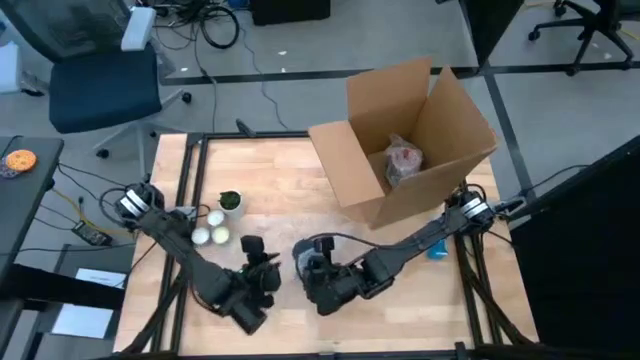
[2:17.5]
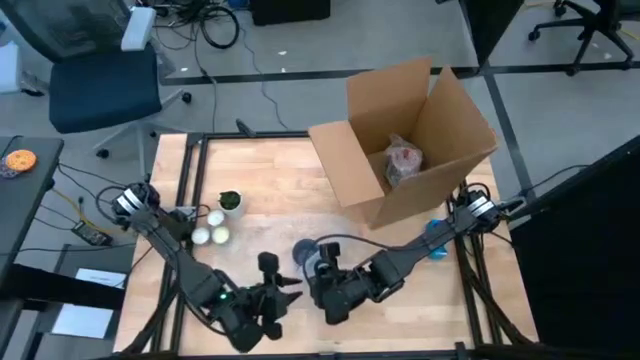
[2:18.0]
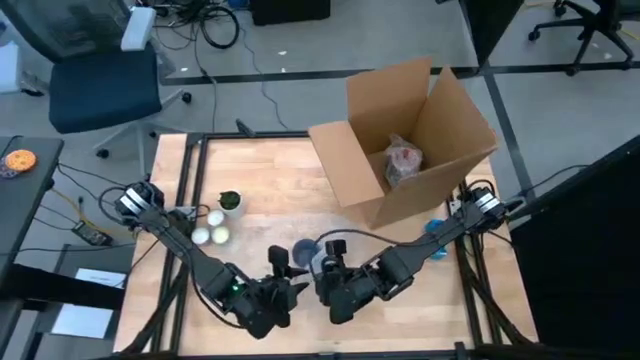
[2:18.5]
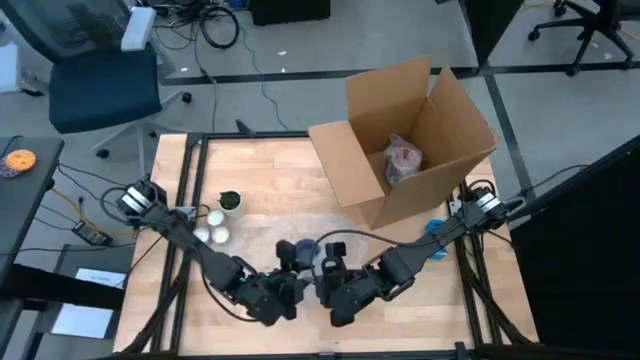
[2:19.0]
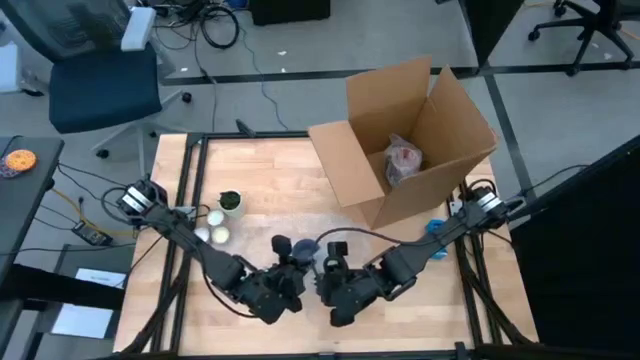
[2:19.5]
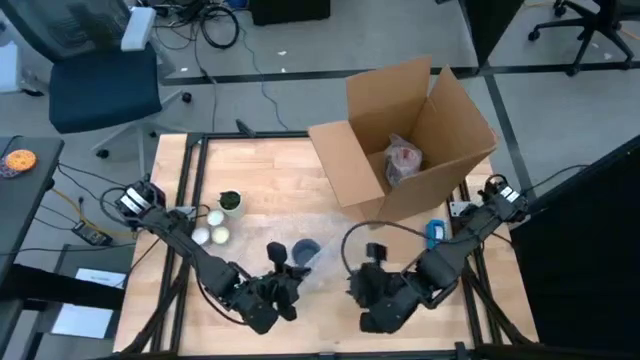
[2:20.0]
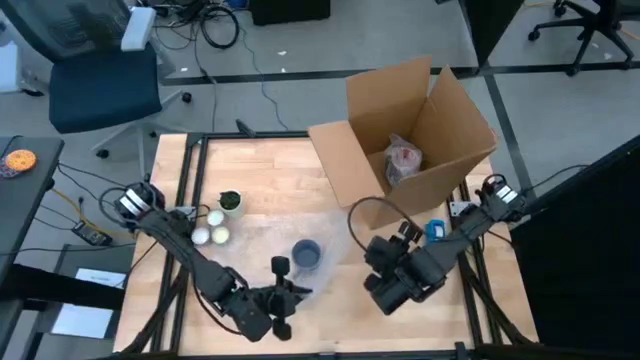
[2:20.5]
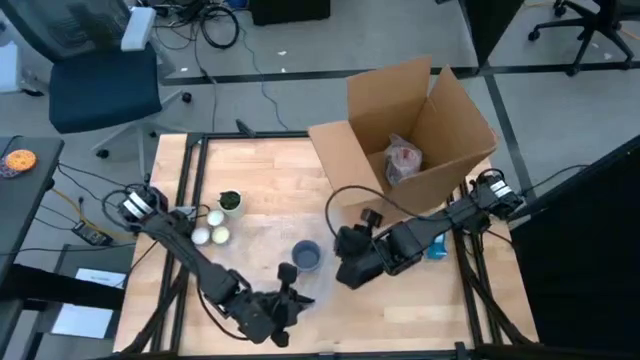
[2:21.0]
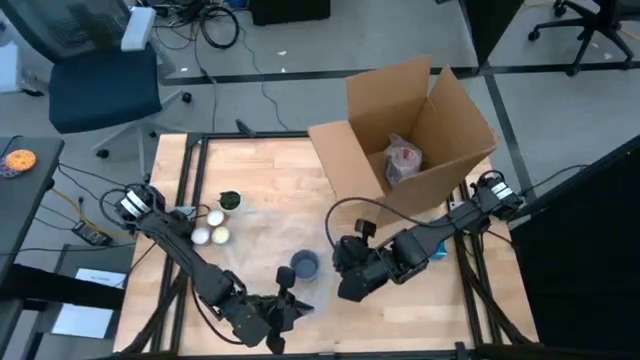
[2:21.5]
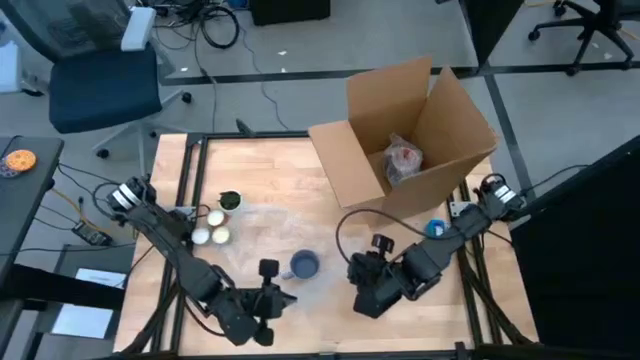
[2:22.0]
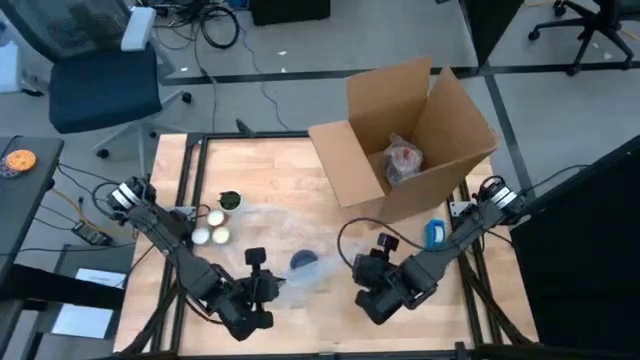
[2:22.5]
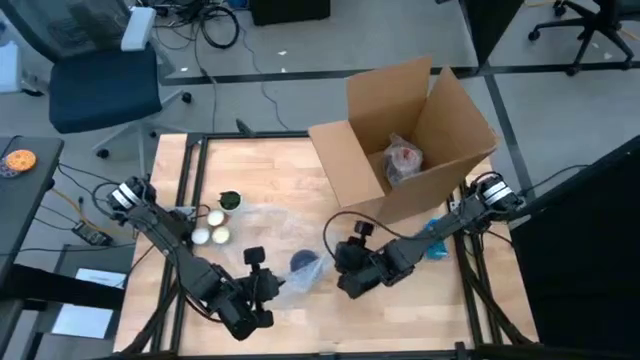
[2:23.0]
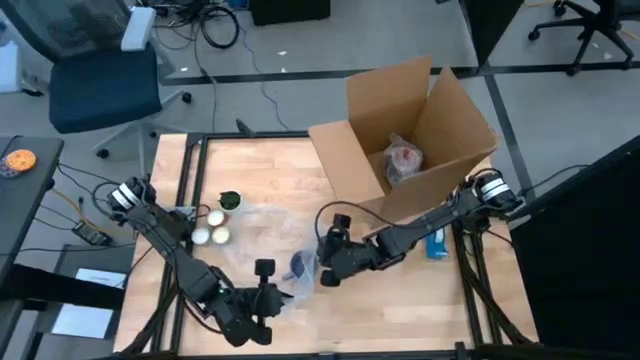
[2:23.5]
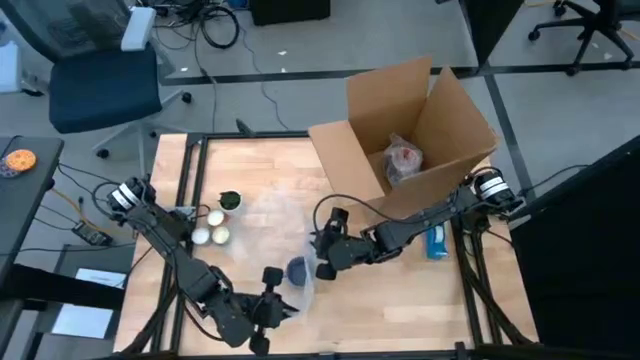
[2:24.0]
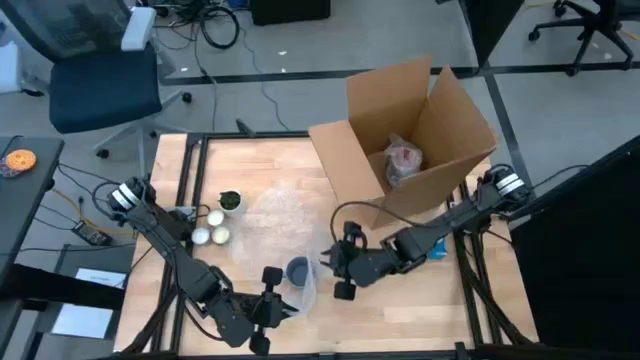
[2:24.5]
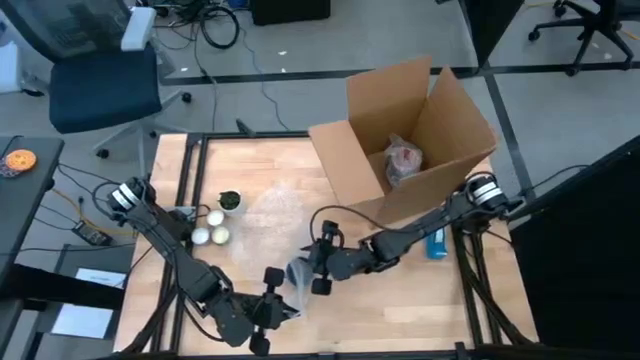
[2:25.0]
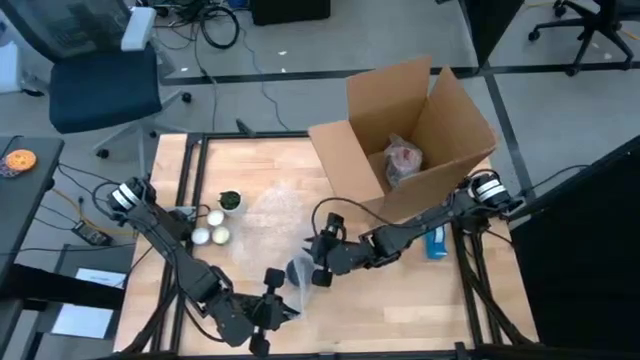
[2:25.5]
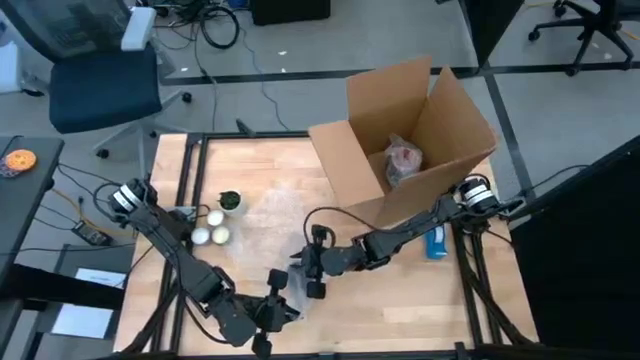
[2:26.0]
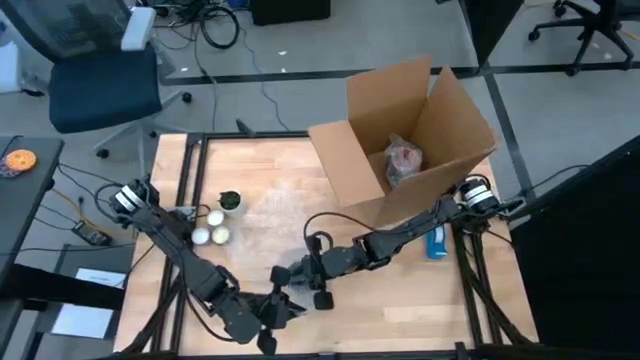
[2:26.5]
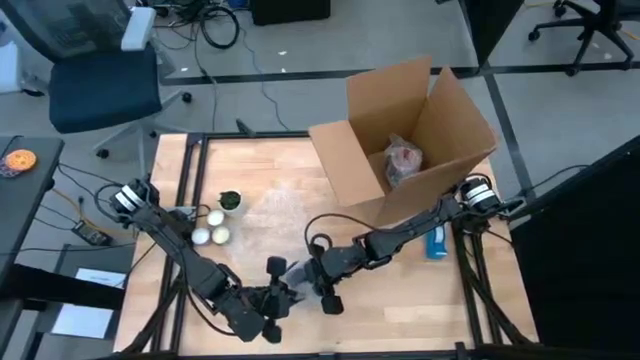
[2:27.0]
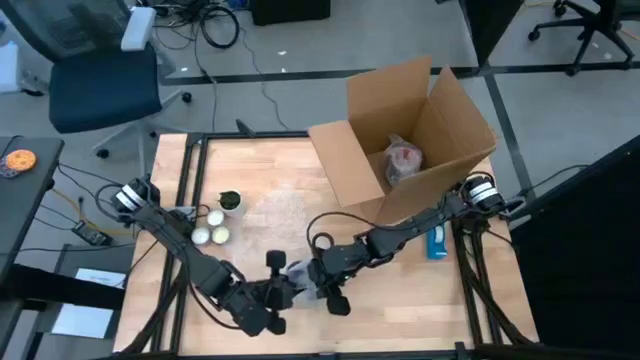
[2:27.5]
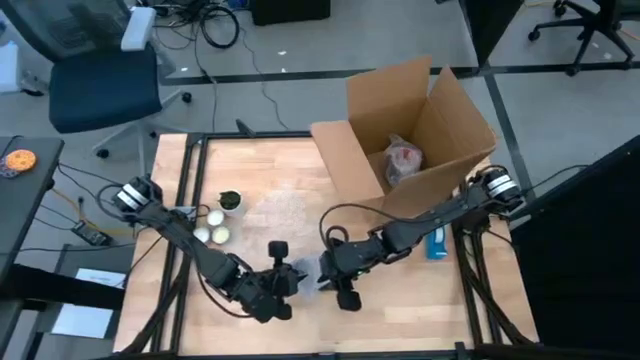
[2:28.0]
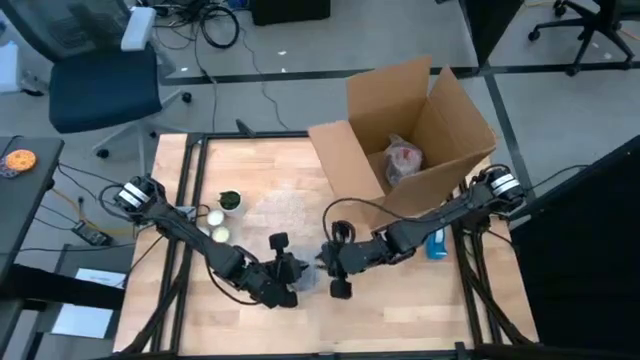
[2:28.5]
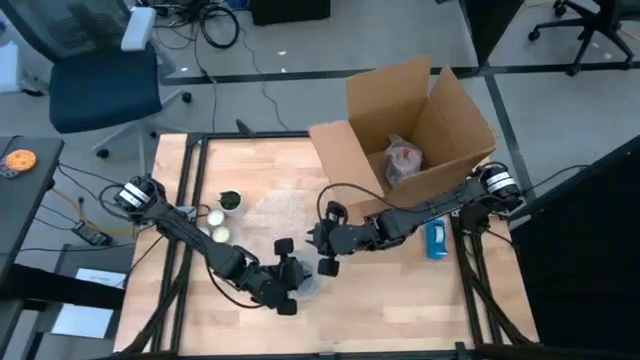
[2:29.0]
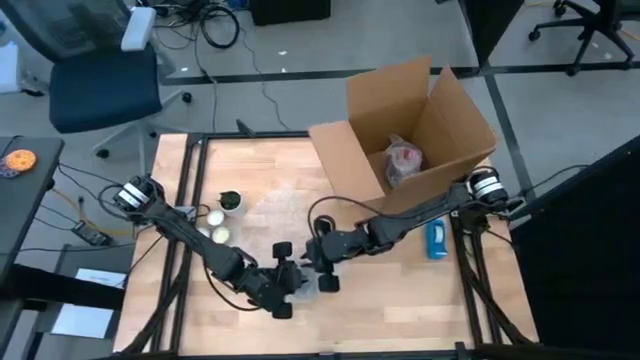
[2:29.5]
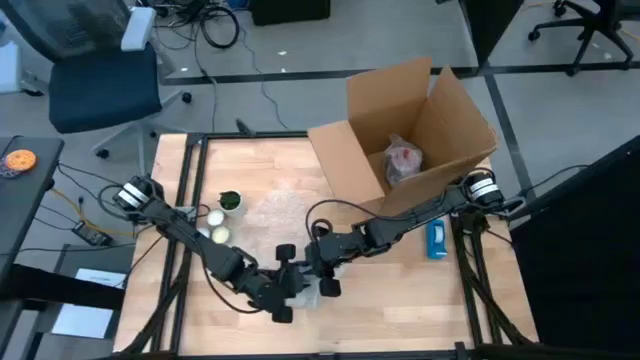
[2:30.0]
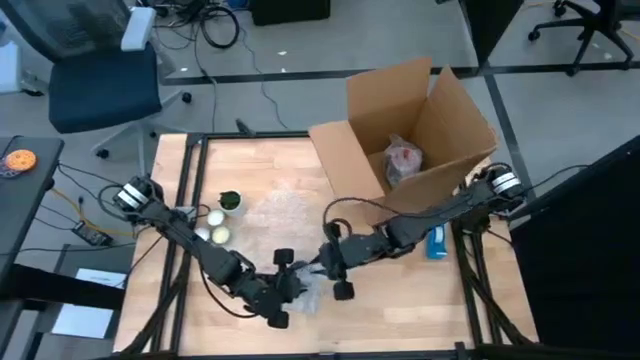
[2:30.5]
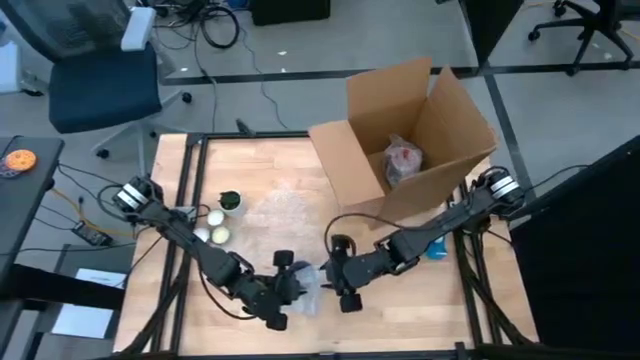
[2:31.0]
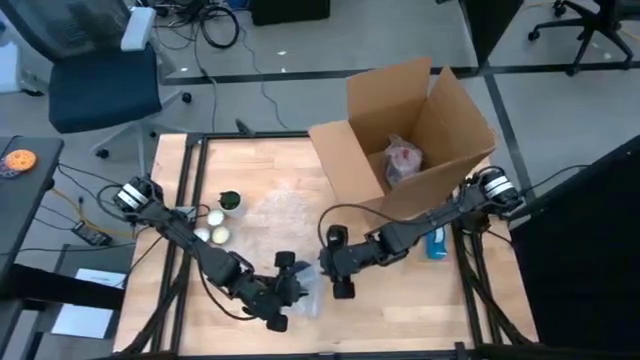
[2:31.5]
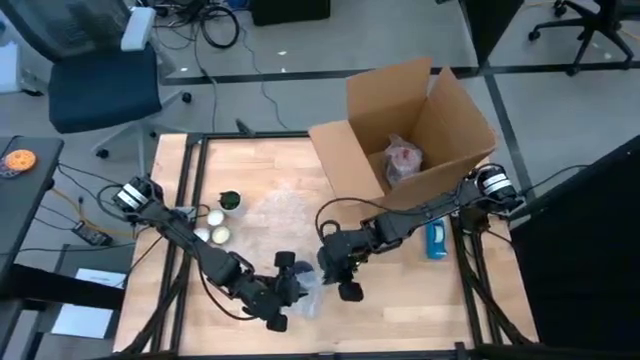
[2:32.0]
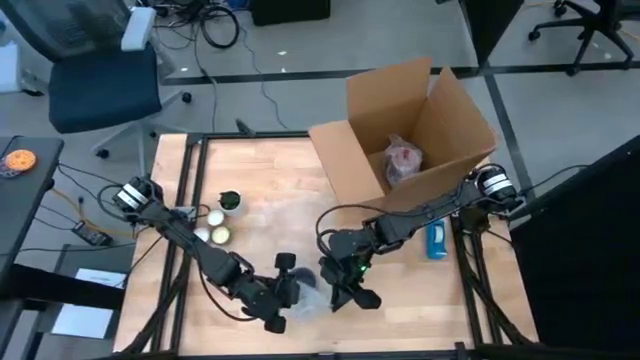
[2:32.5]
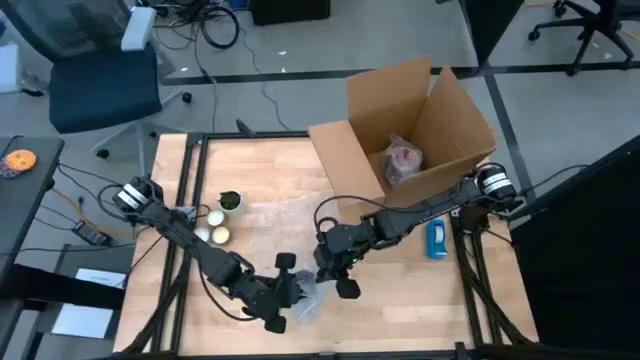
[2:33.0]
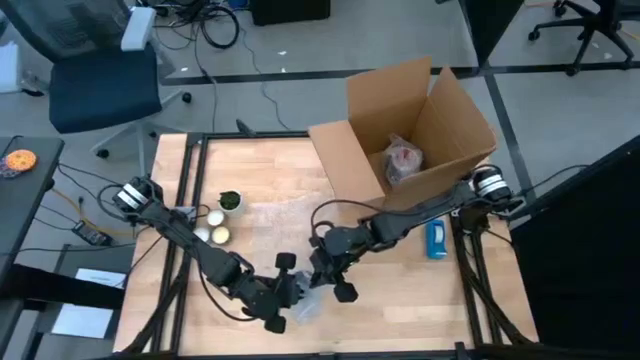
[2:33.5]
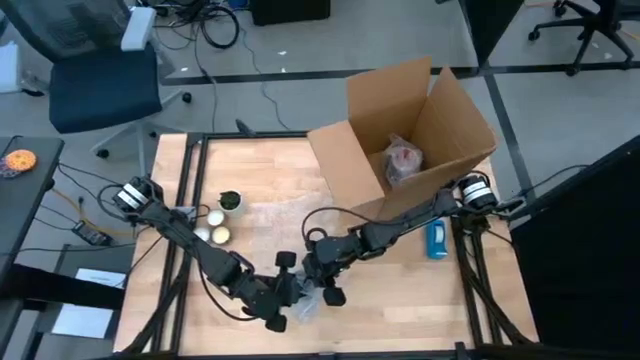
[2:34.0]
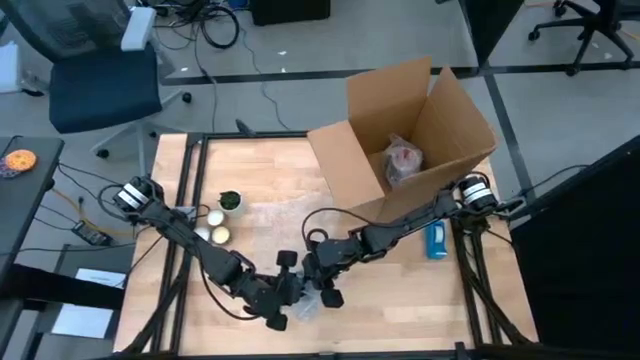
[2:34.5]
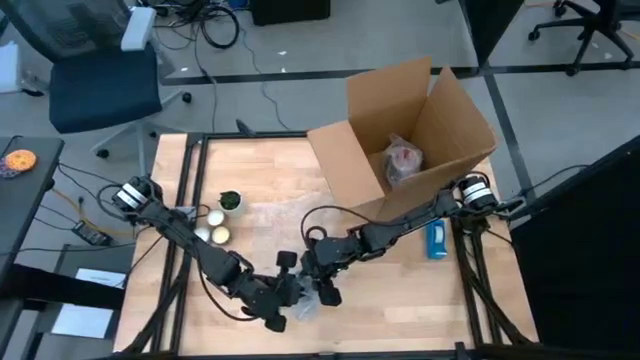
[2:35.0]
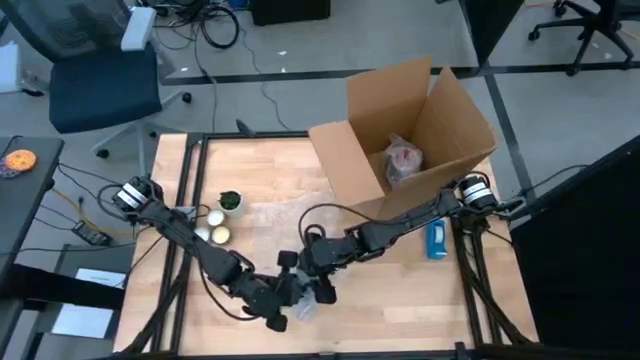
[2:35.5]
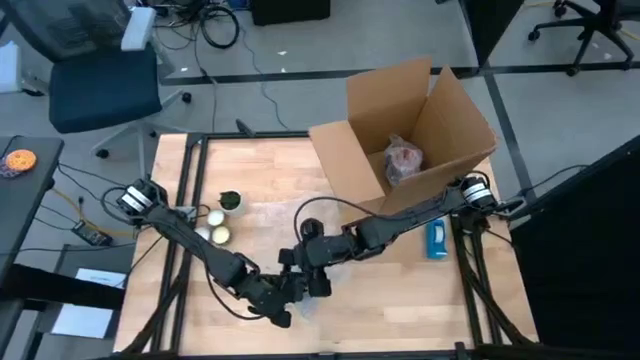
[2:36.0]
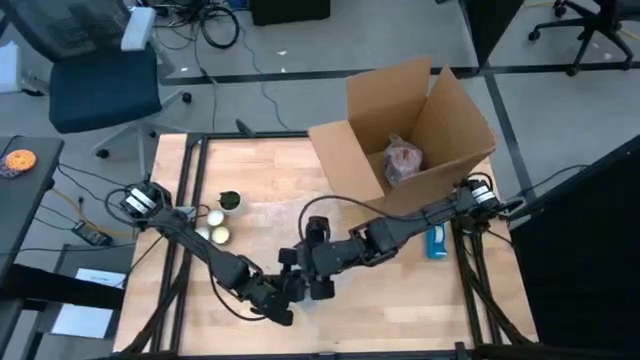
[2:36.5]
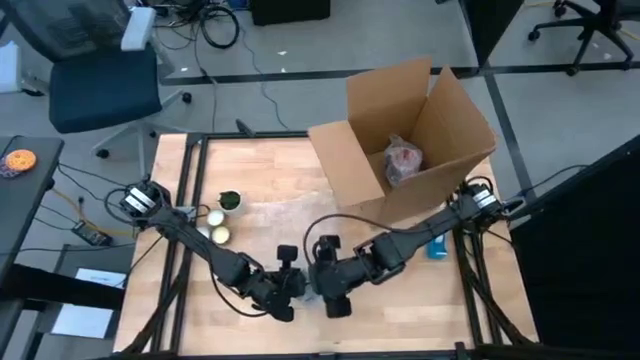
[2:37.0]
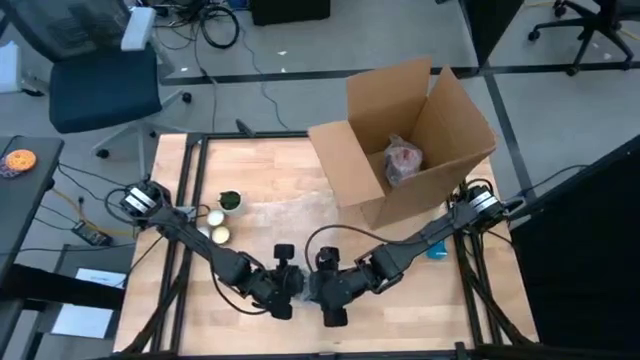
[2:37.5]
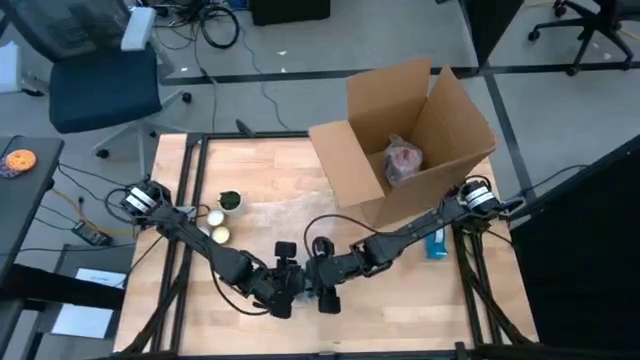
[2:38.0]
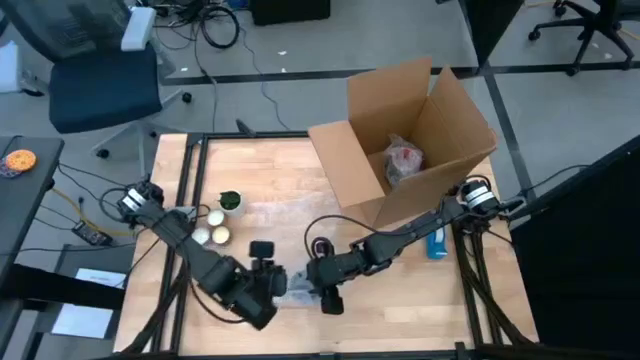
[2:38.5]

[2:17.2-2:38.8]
Task: wrap mug
Wrap the blue mug with bubble wrap
